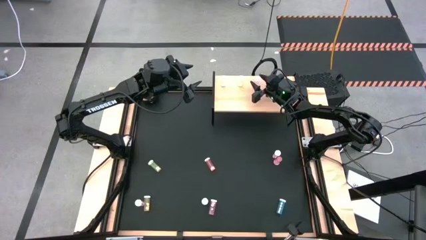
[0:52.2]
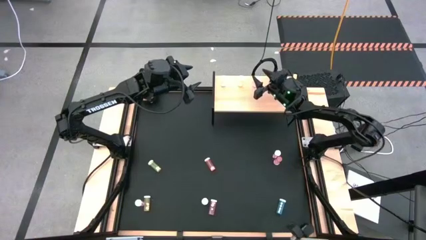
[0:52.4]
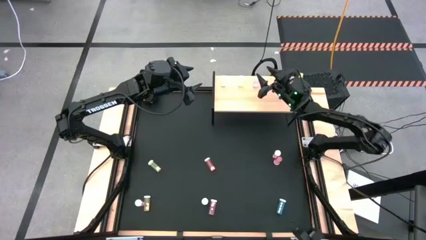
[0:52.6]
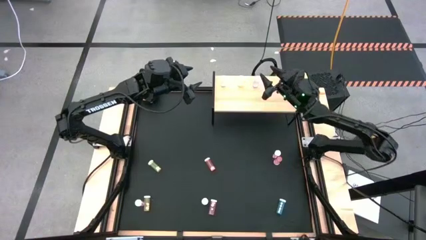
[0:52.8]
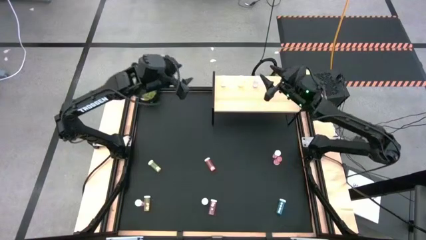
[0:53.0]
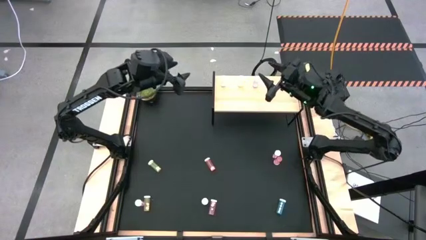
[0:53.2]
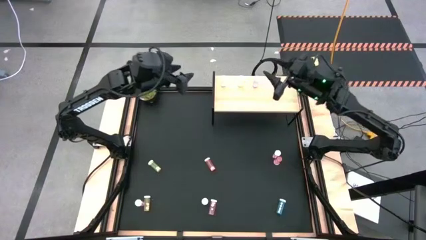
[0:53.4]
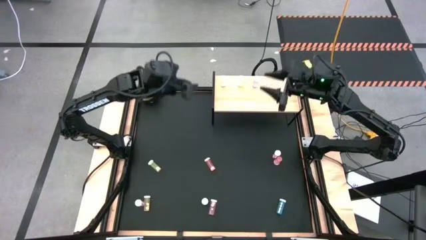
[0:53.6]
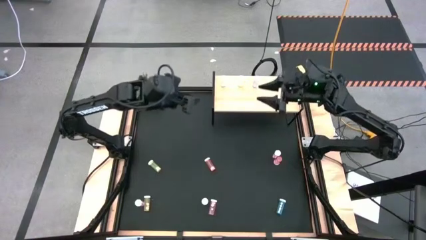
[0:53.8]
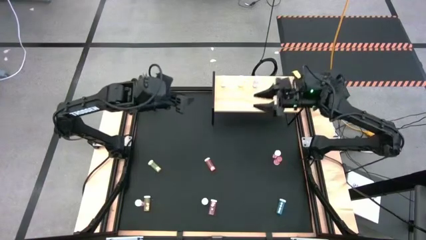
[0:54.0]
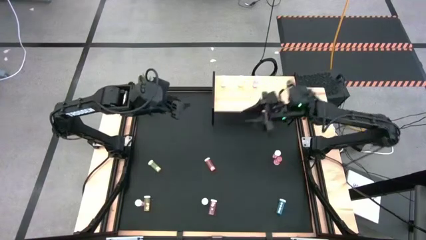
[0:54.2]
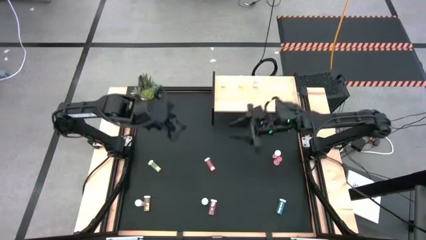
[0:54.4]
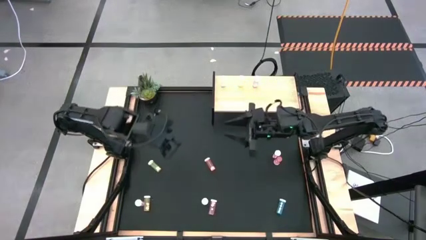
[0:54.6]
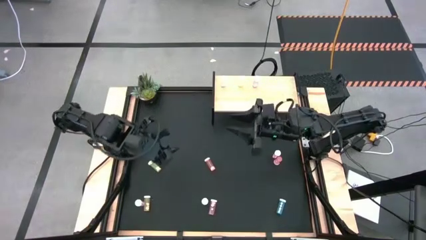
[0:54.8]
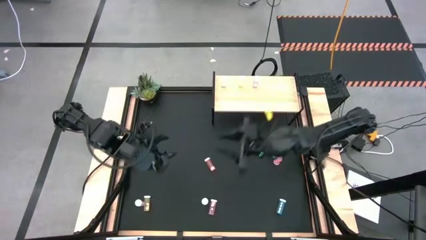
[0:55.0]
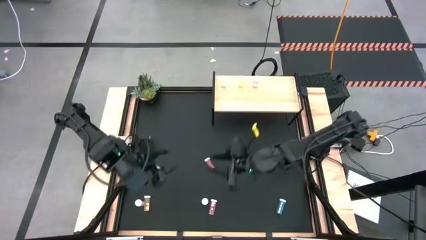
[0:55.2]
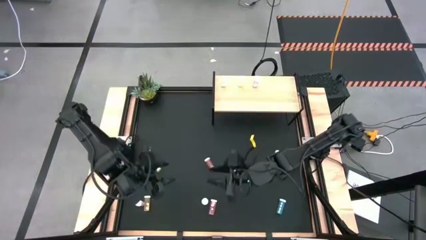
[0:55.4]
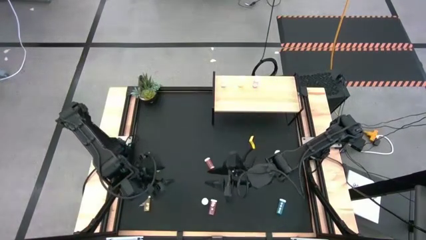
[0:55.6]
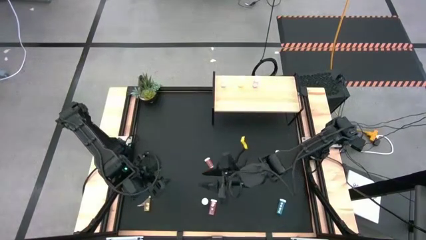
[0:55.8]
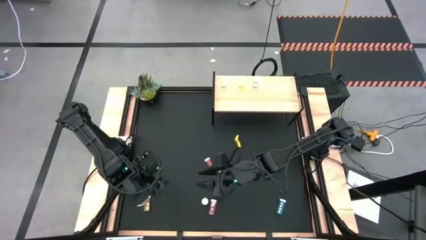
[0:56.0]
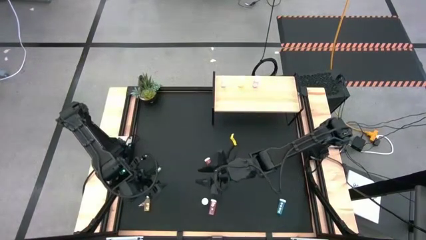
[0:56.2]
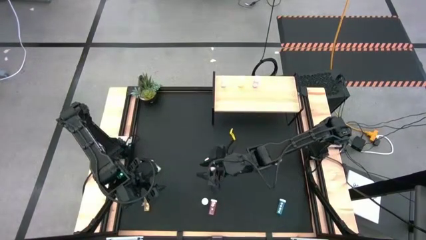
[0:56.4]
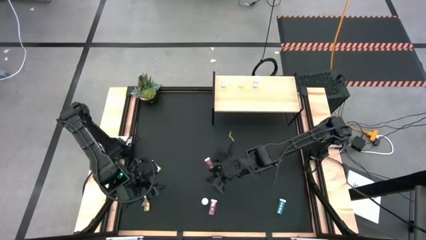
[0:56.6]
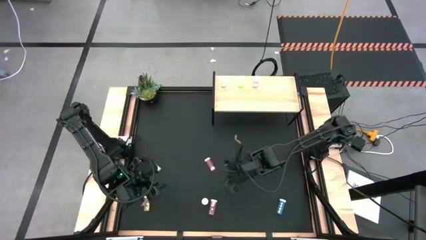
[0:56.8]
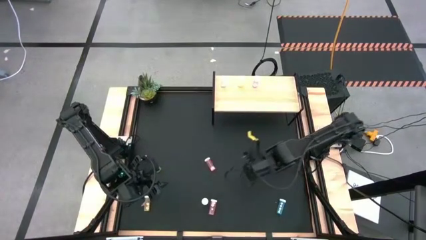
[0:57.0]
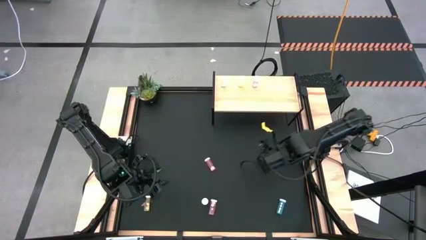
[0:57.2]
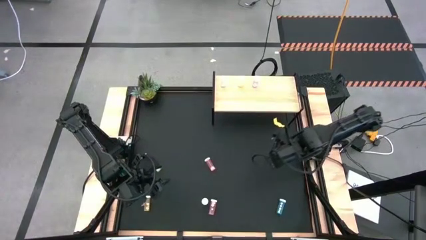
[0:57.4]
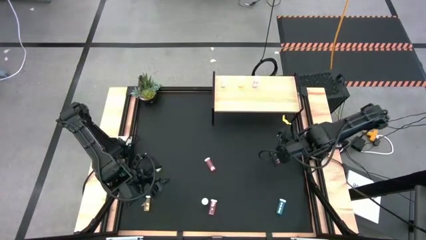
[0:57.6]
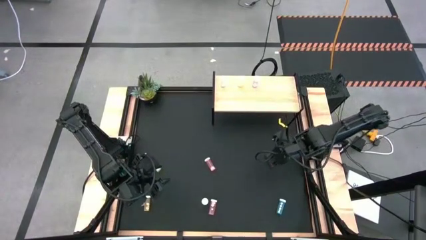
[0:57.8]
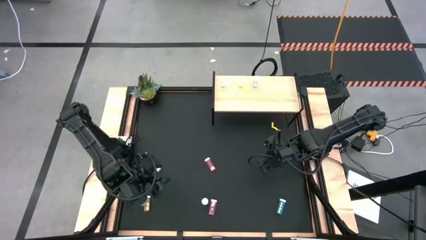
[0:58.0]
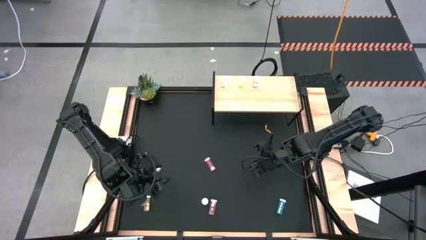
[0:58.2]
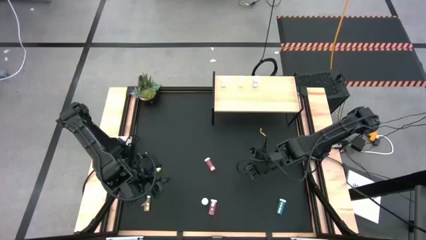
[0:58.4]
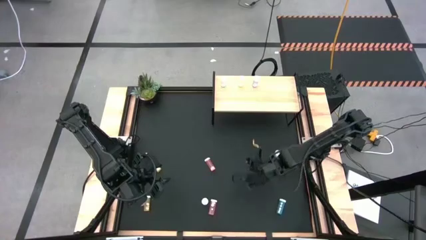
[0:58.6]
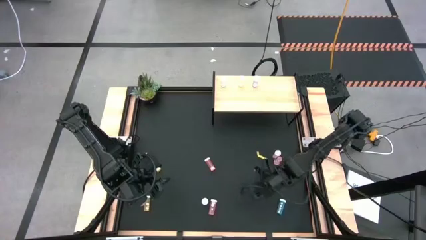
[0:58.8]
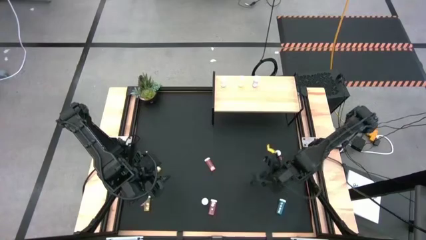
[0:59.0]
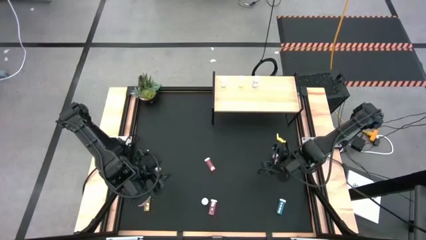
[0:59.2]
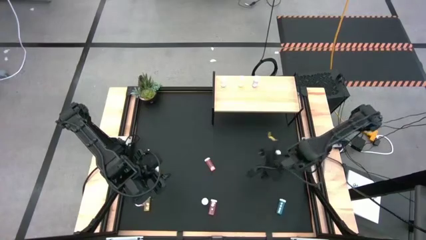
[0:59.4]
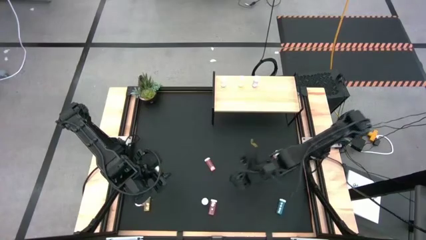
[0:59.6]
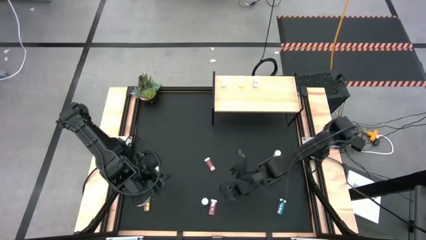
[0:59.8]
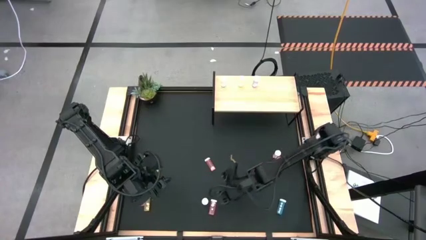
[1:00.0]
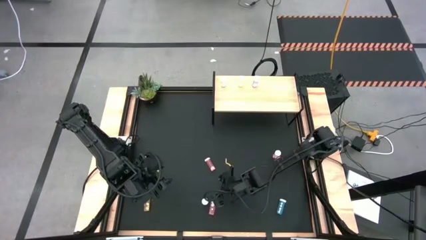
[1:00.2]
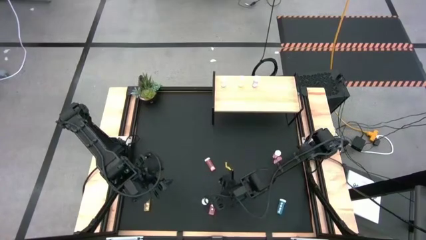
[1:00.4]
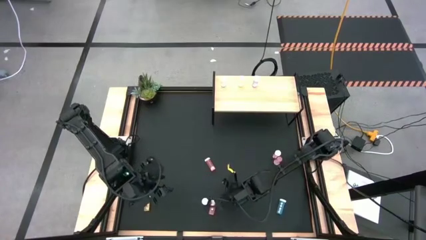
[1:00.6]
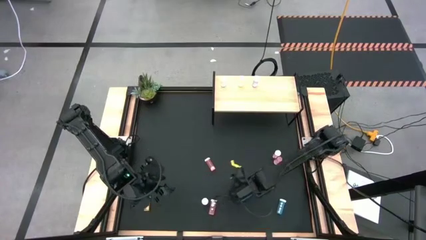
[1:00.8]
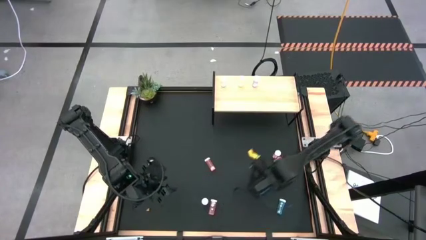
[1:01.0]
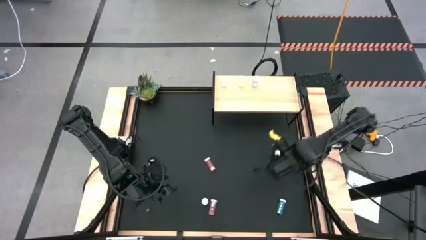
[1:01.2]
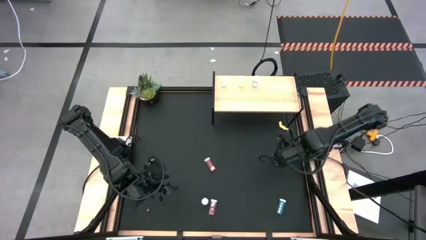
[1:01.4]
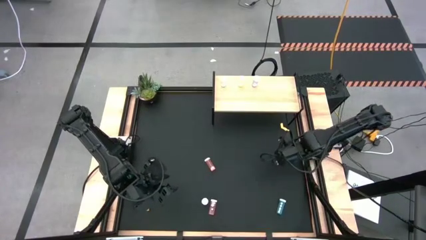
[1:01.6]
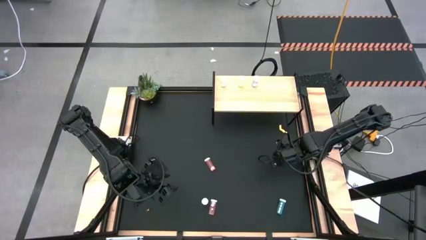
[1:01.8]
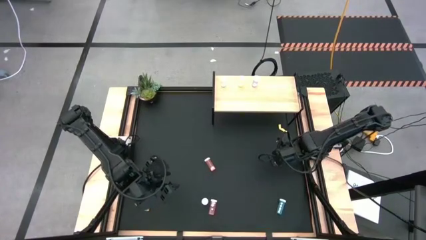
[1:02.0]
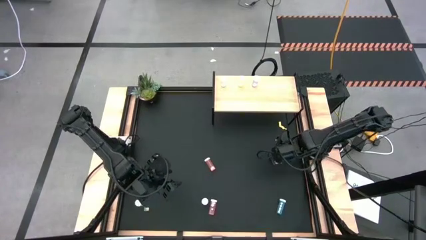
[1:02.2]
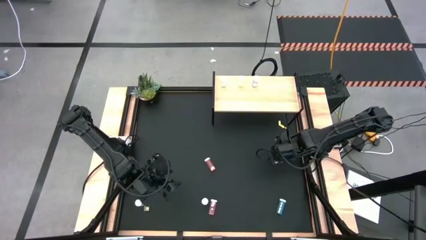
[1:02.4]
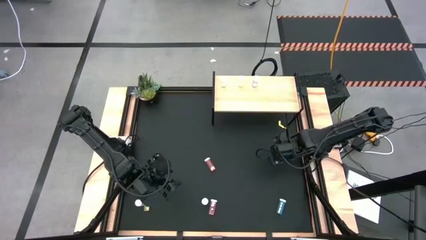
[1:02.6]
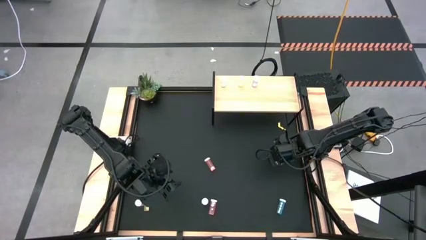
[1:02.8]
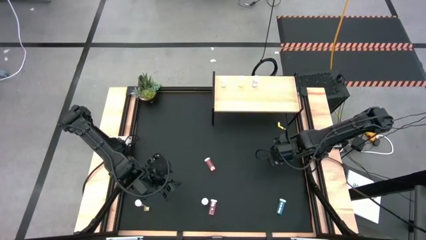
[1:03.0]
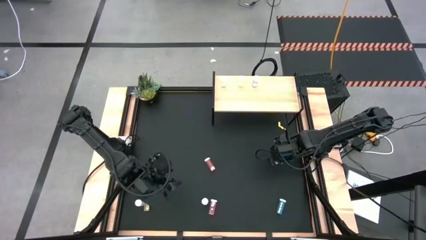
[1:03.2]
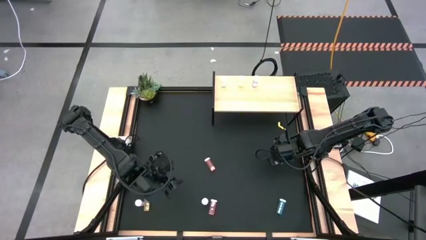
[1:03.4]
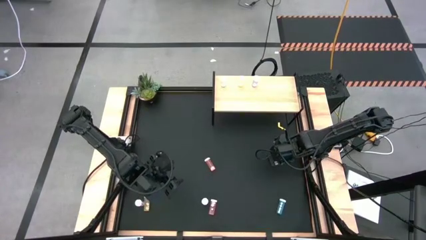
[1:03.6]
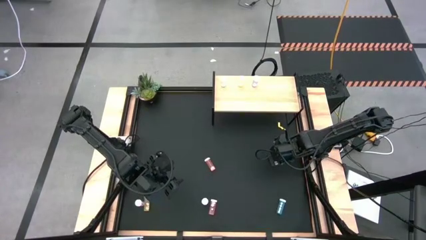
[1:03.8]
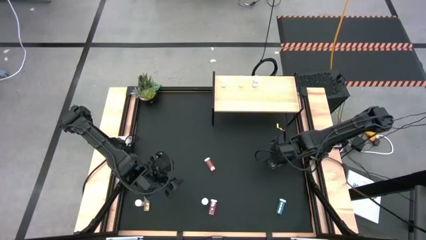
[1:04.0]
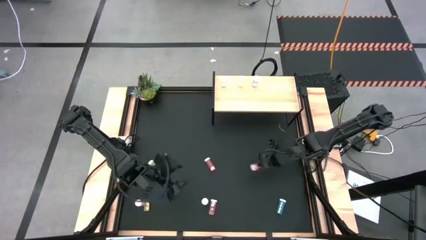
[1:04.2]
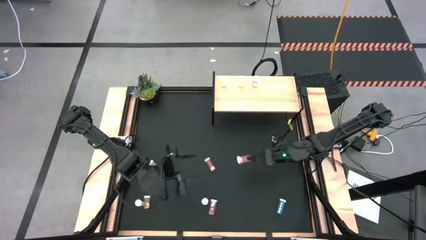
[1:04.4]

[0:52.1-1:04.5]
Task: Pick and place medicine bottles onto shelf by color
Put the top orange pill bottle on the shelf
